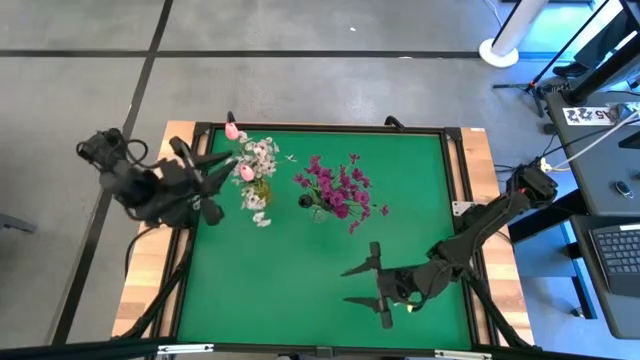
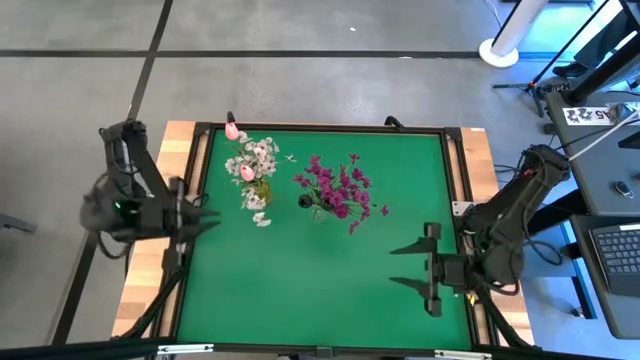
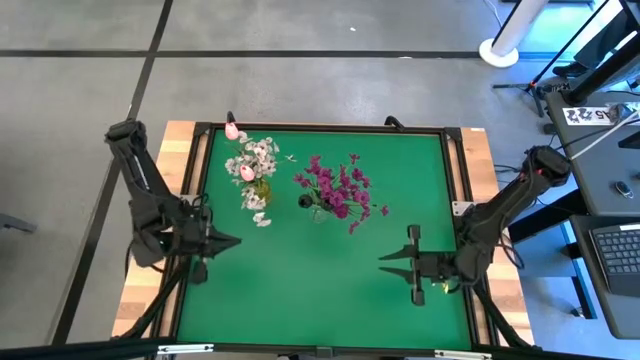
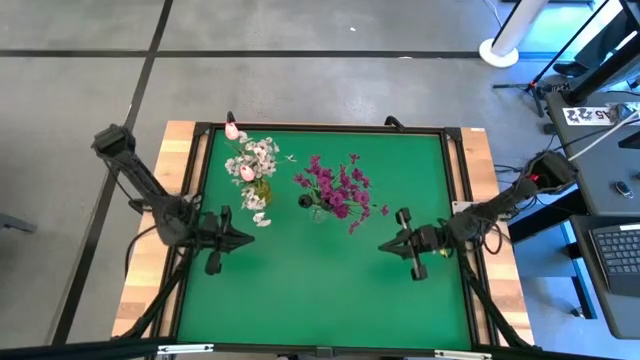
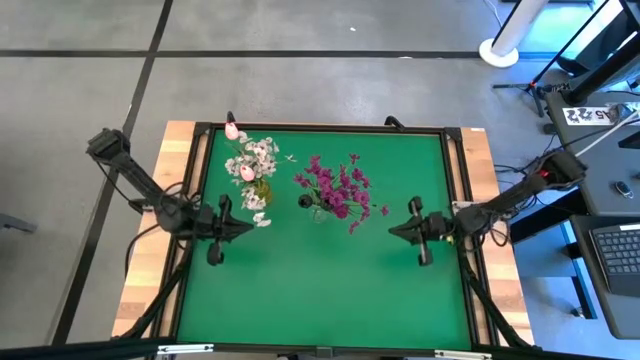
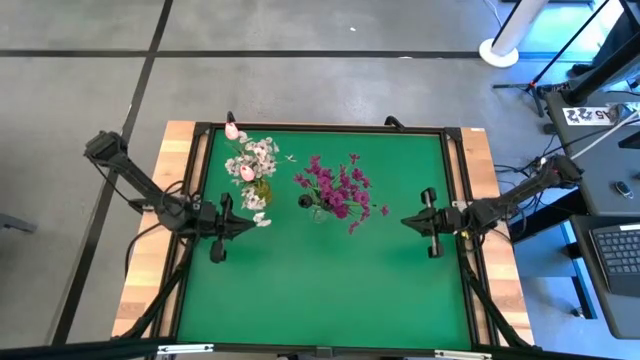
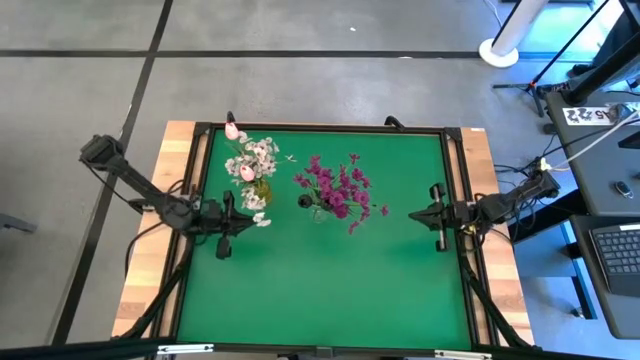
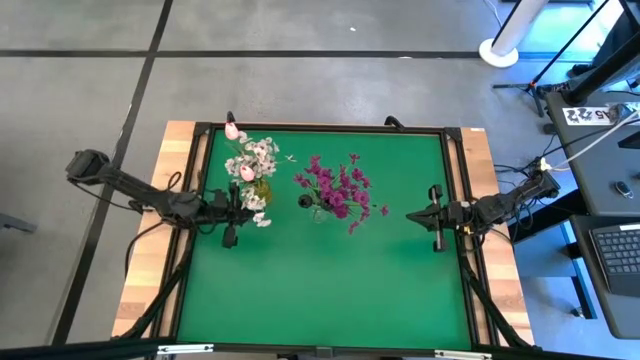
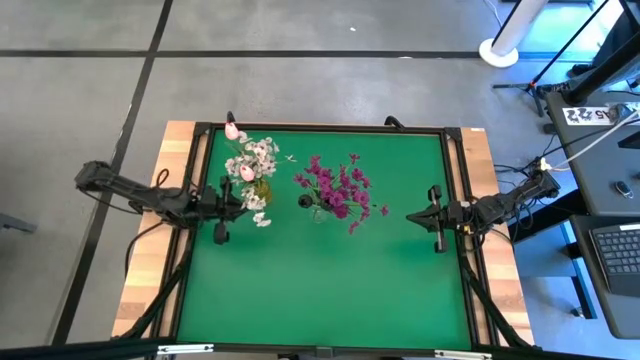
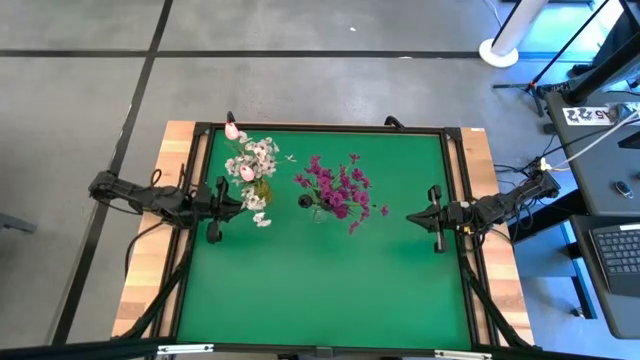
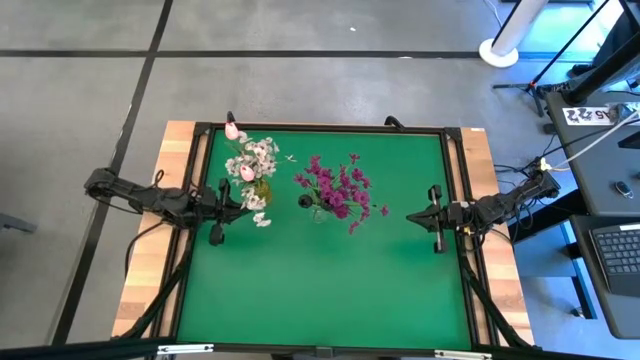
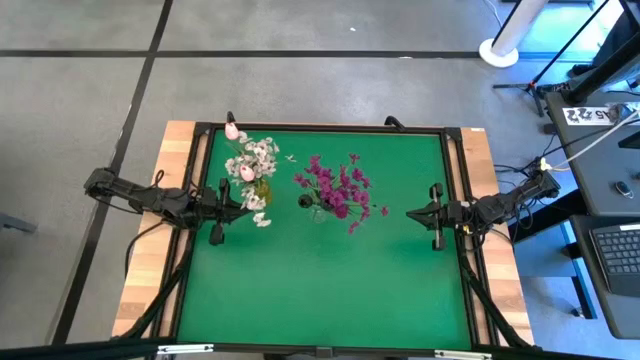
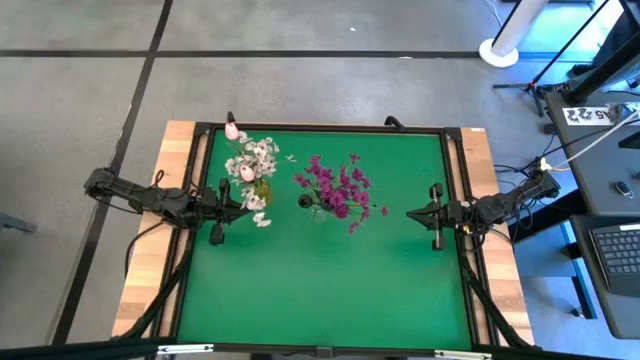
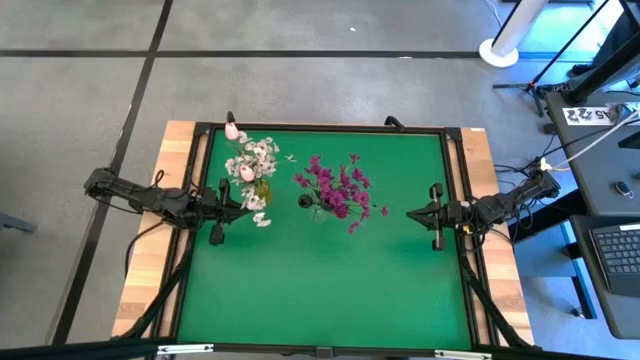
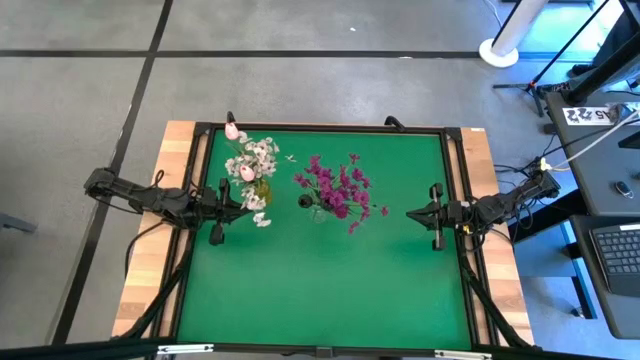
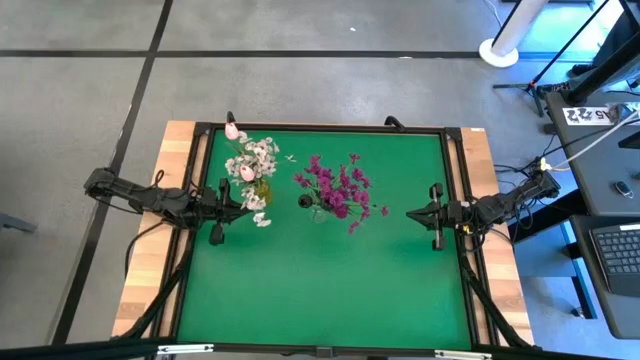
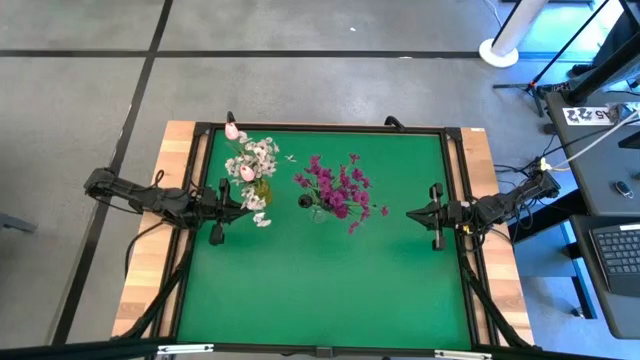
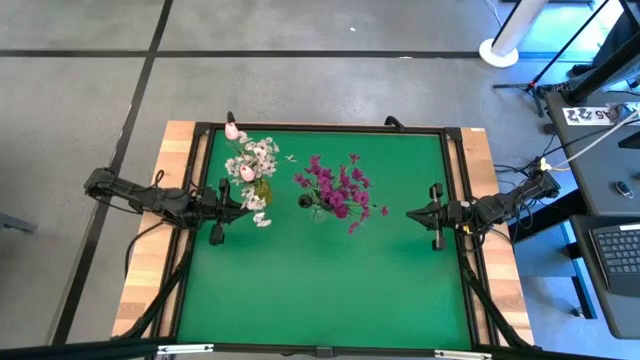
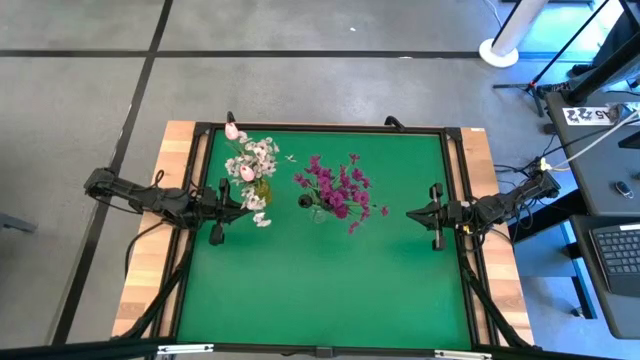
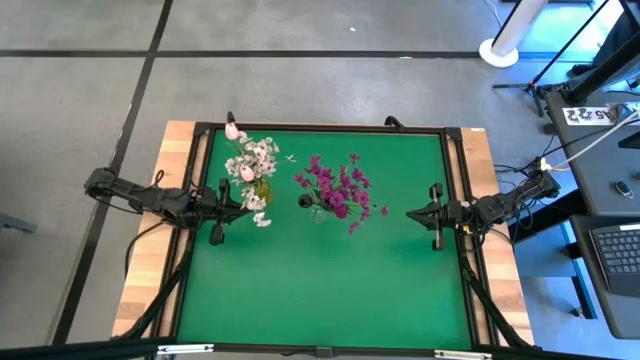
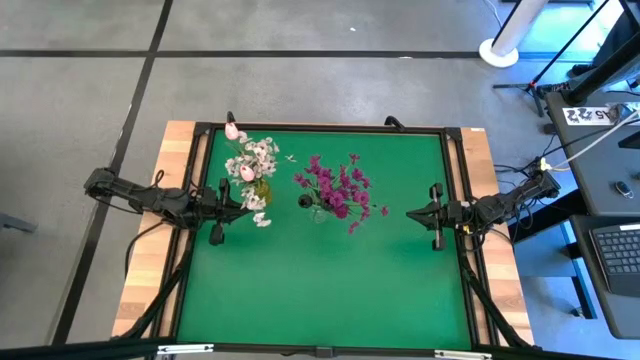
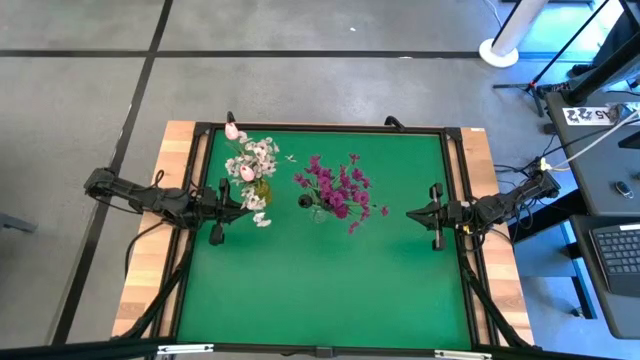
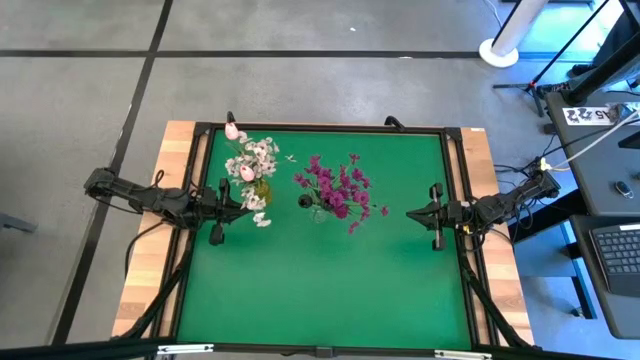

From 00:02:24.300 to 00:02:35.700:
Task: Sort flowers into vase by color
Return to Home Position

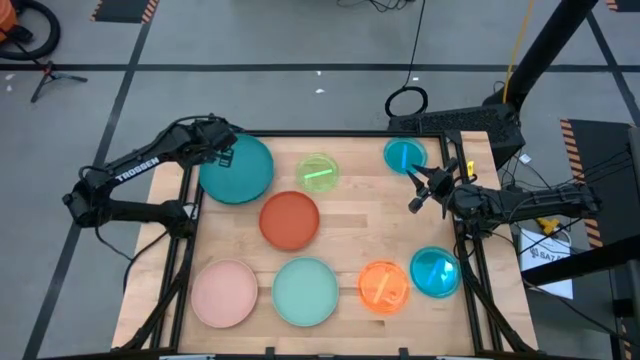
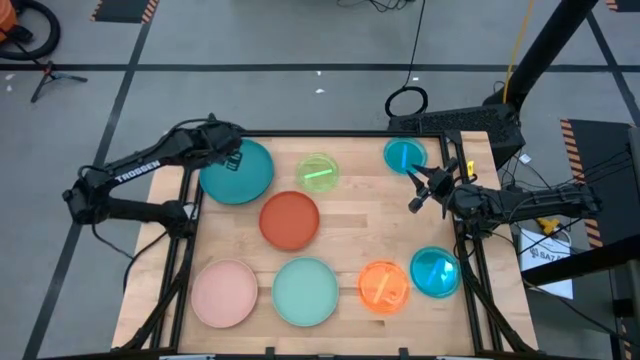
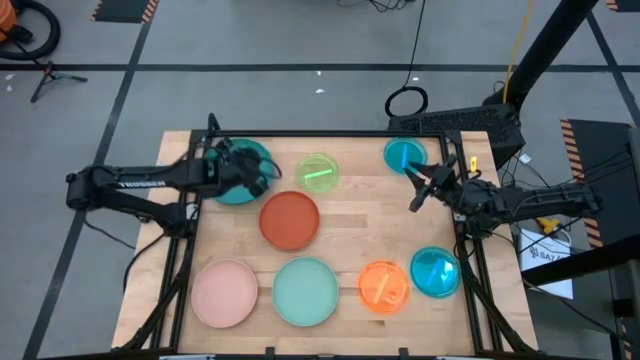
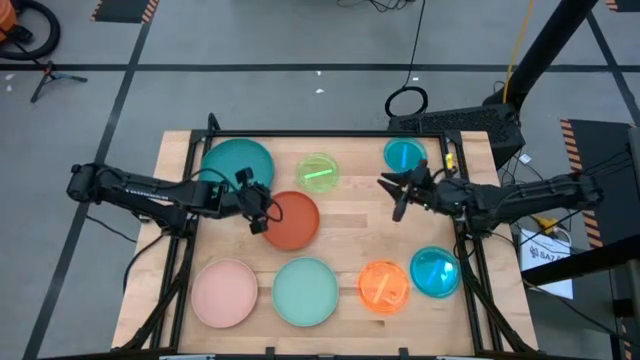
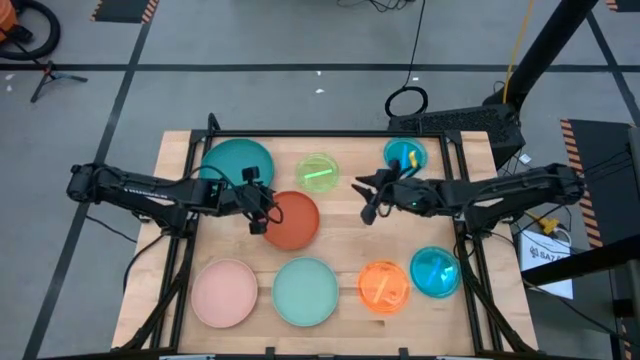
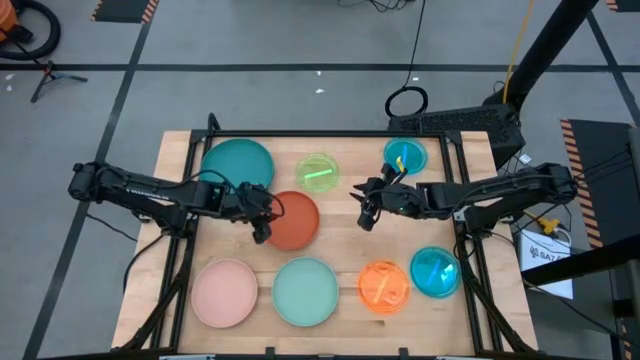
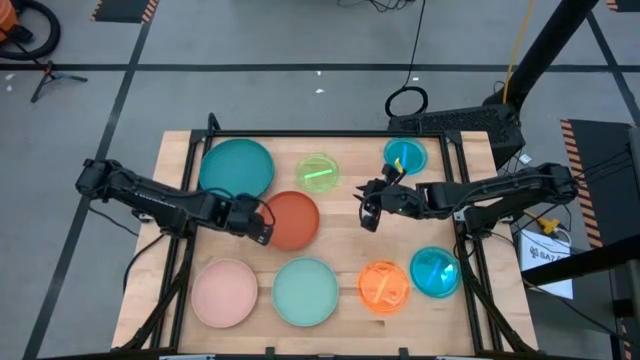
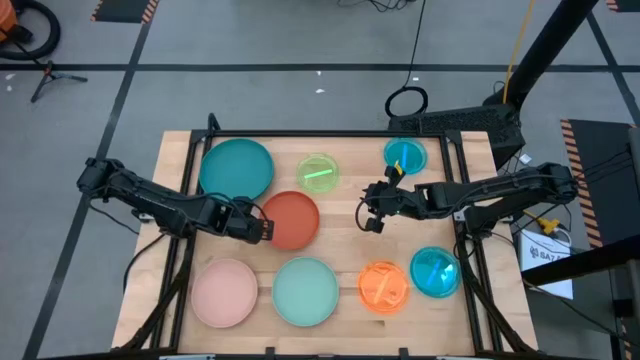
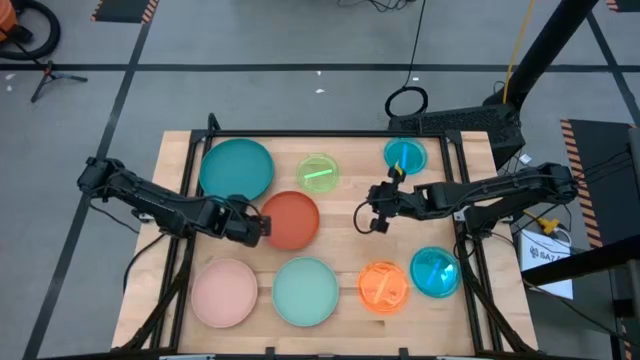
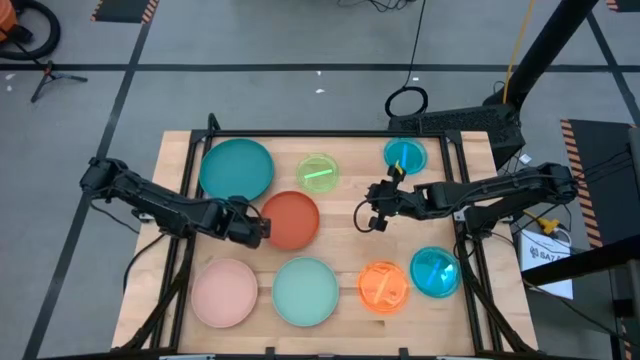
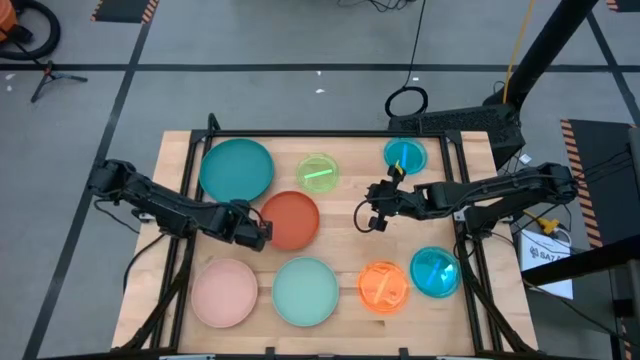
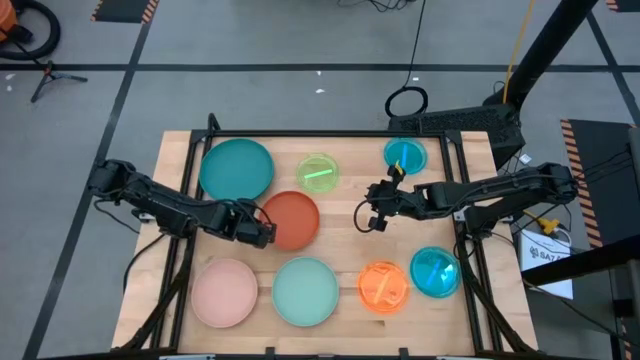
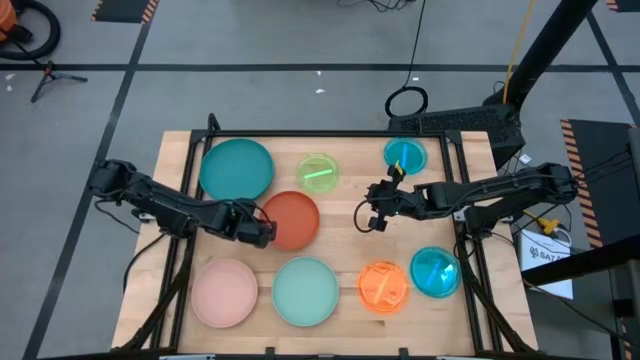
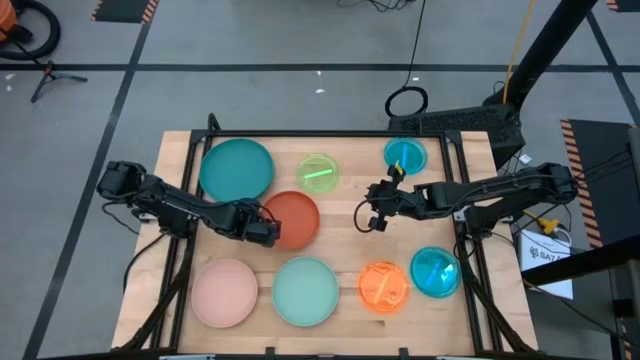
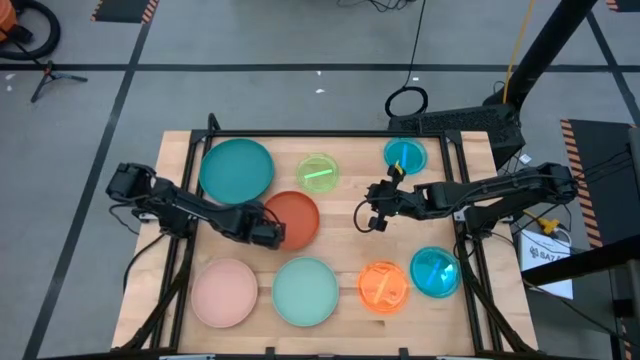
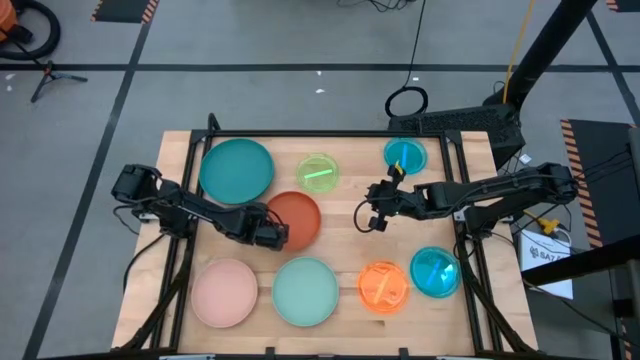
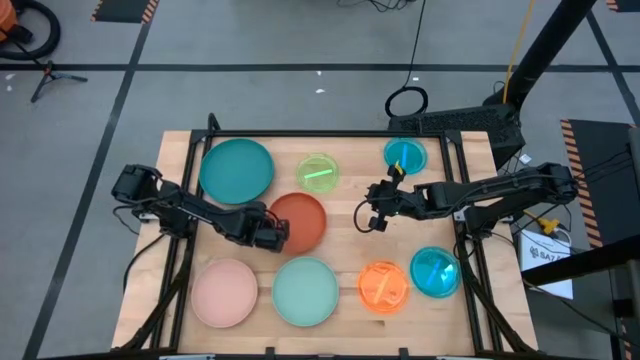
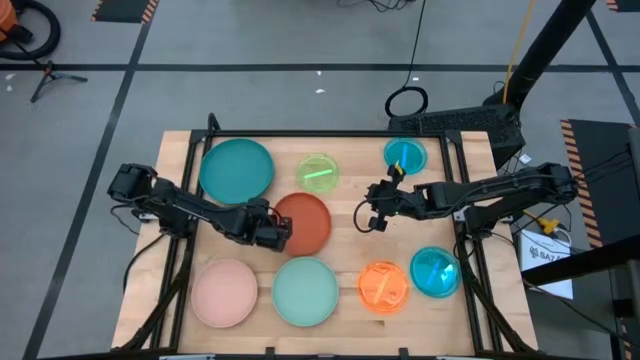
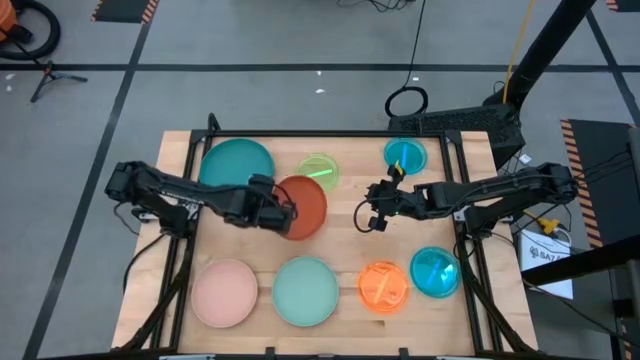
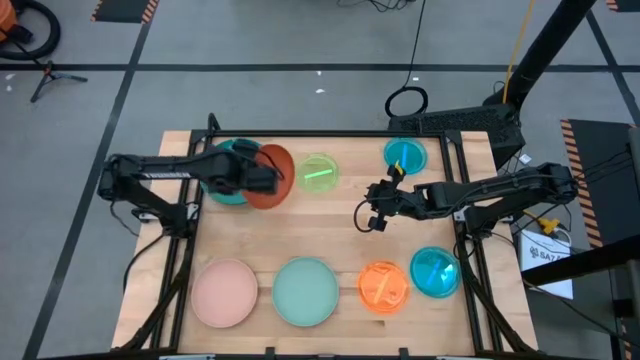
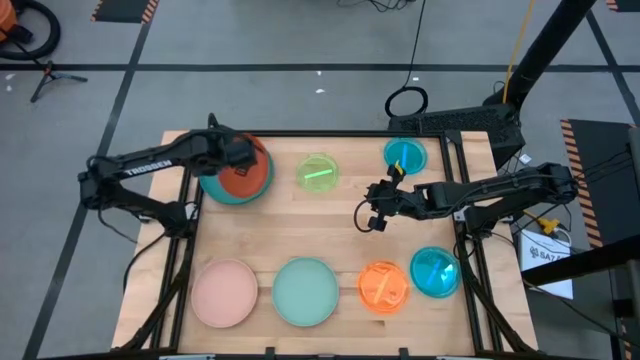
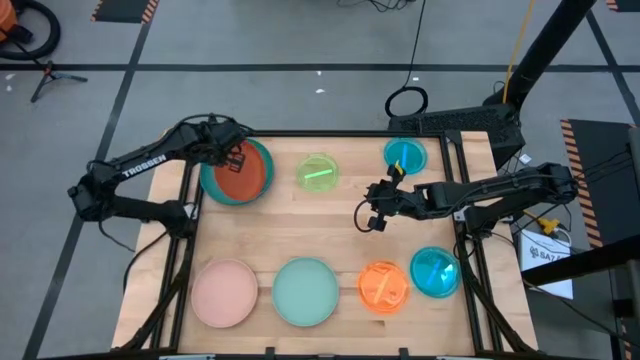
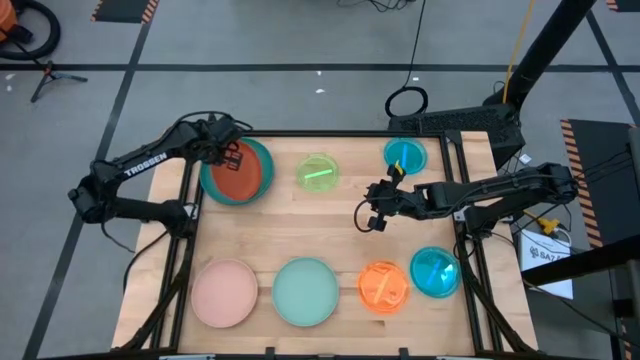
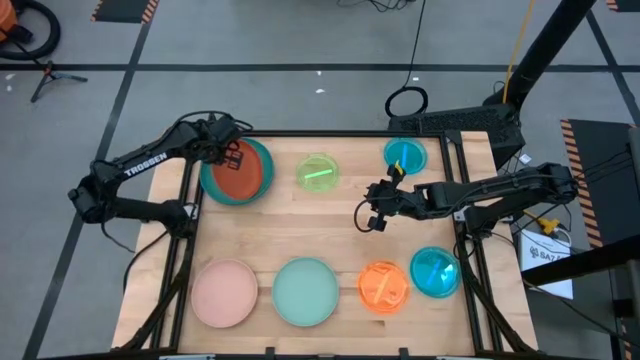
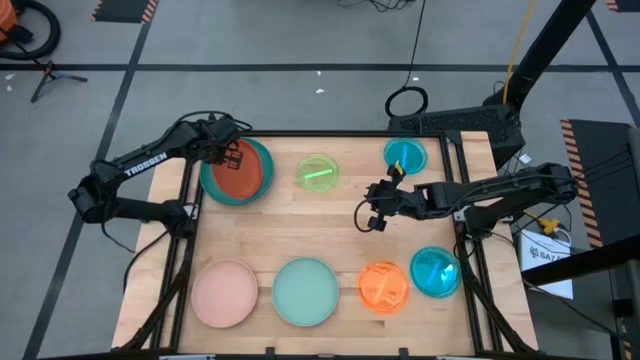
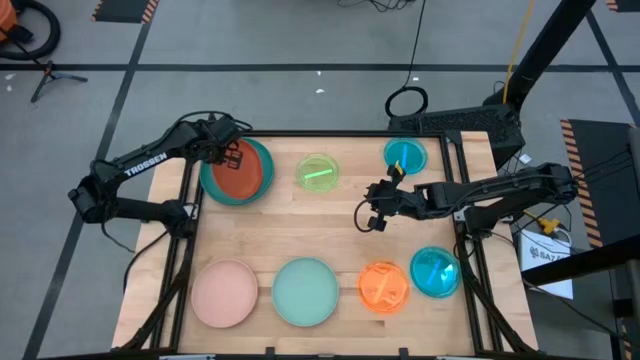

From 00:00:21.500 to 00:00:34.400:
Task: Stack plastic plates
Stack the dark orange plate on top of the dark blue plate
